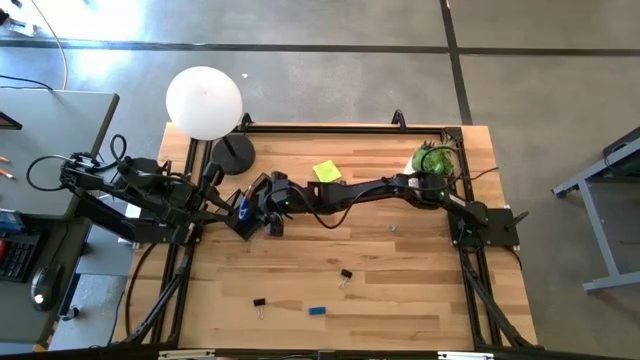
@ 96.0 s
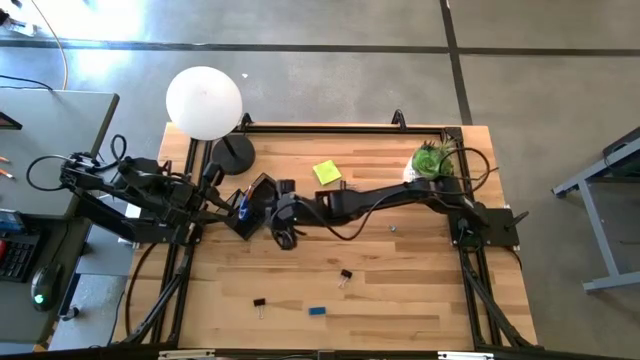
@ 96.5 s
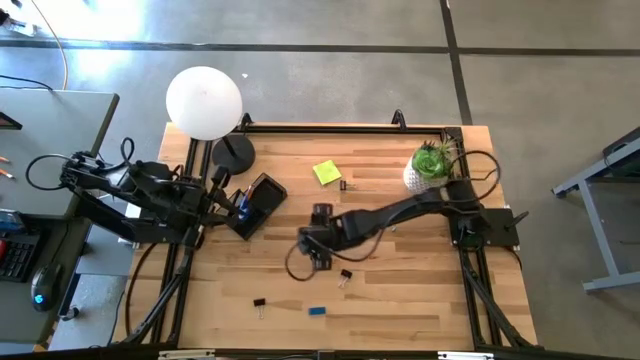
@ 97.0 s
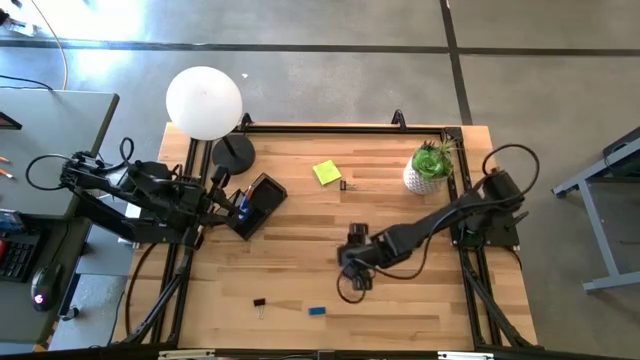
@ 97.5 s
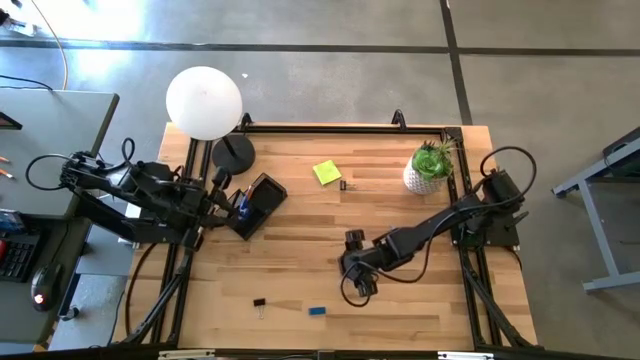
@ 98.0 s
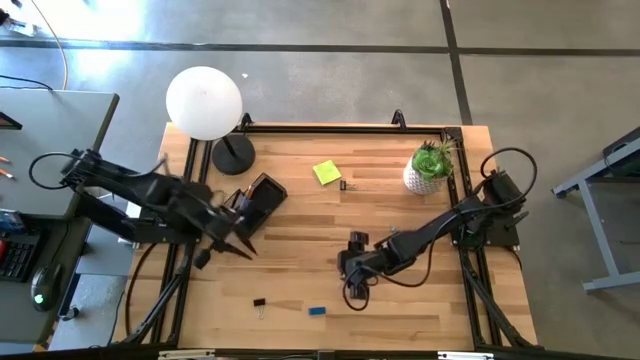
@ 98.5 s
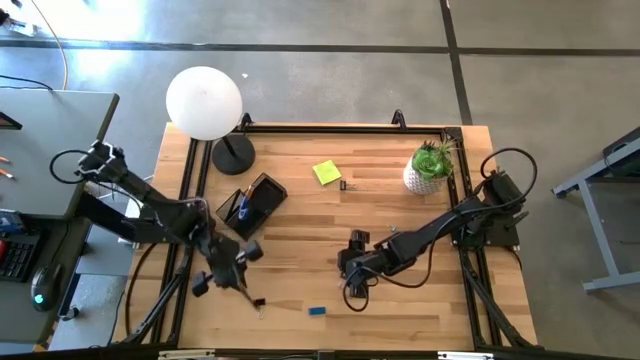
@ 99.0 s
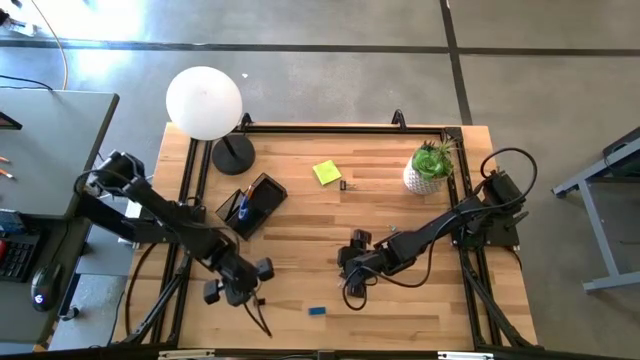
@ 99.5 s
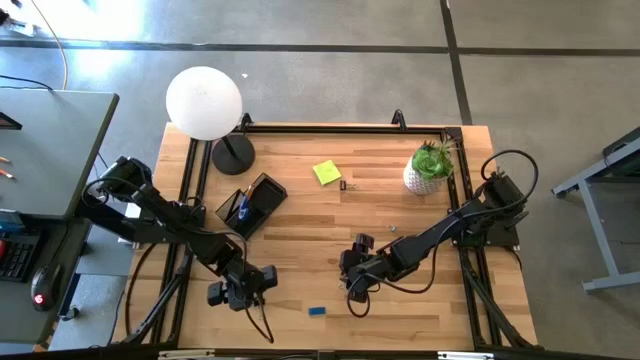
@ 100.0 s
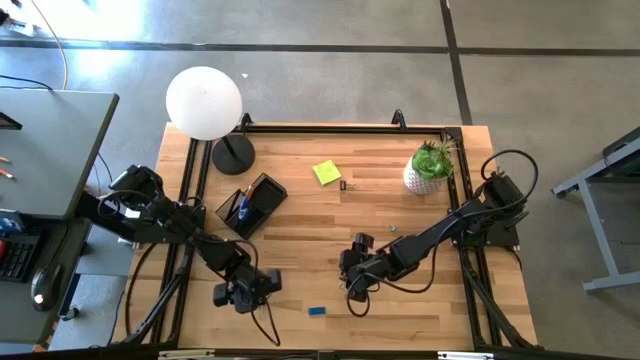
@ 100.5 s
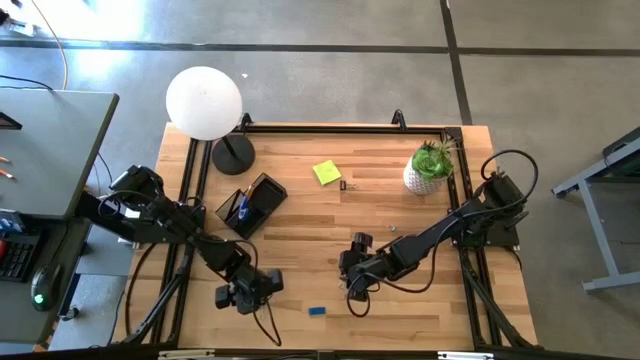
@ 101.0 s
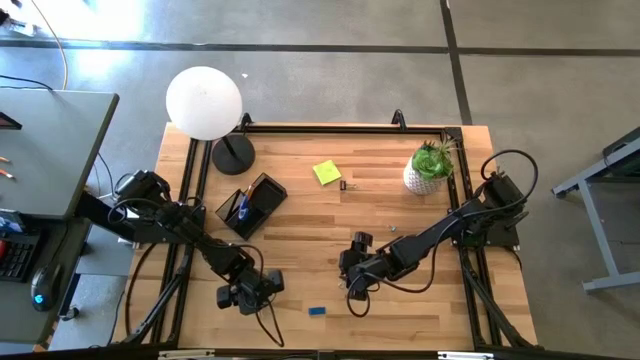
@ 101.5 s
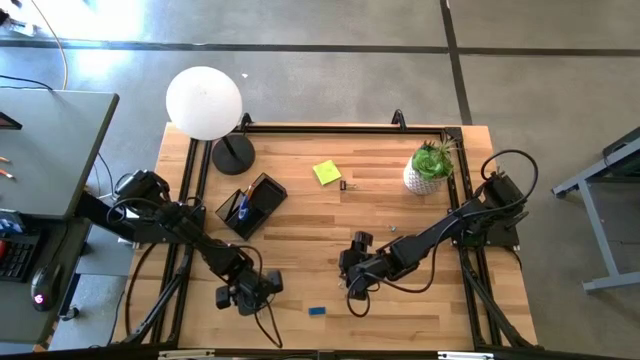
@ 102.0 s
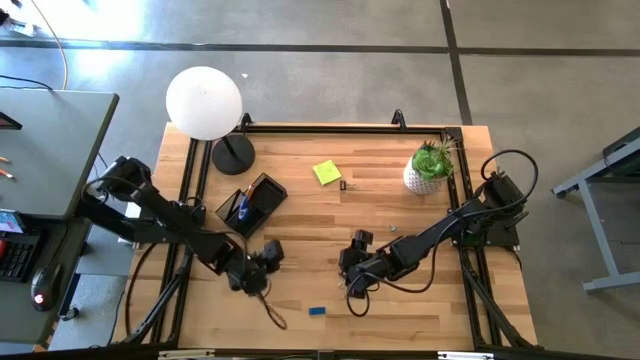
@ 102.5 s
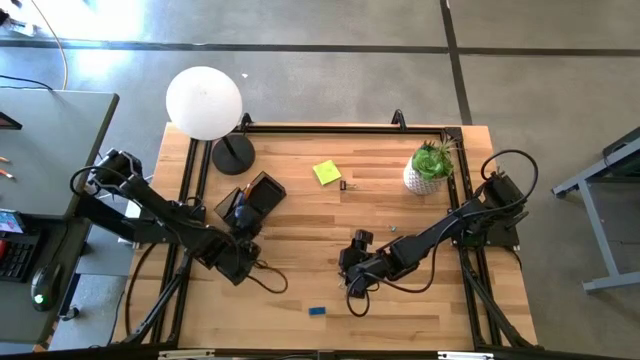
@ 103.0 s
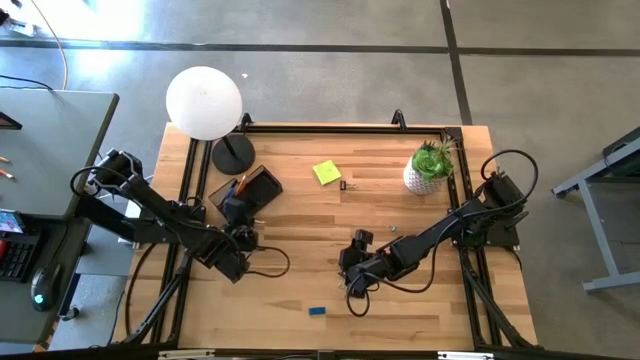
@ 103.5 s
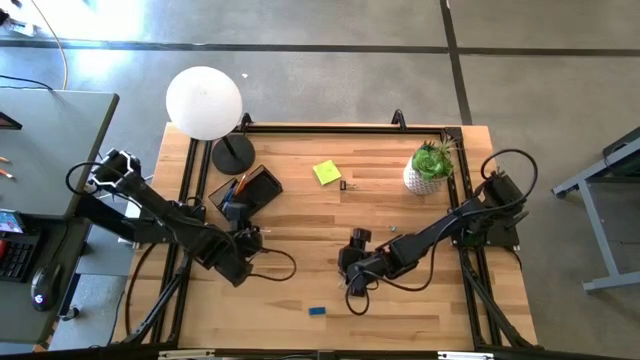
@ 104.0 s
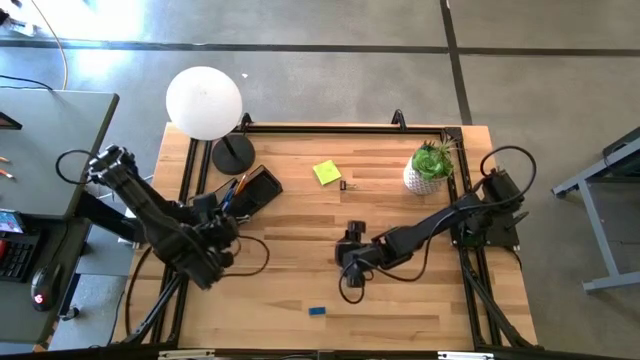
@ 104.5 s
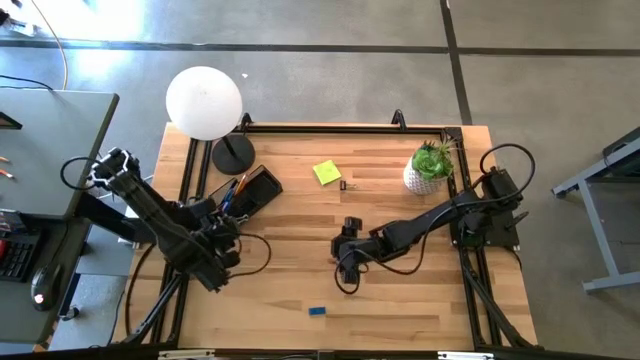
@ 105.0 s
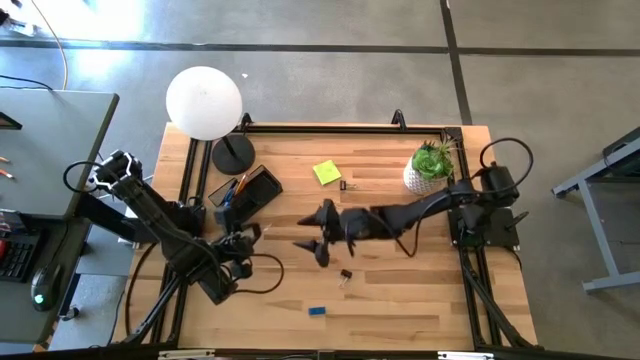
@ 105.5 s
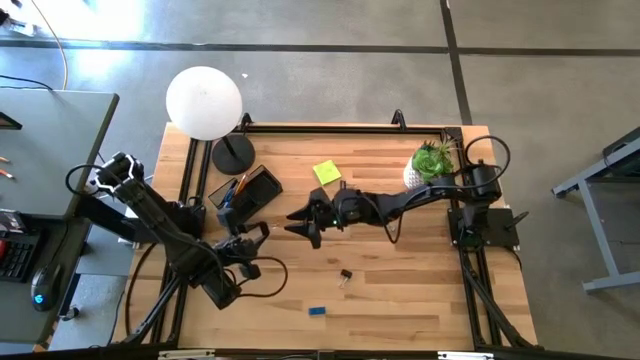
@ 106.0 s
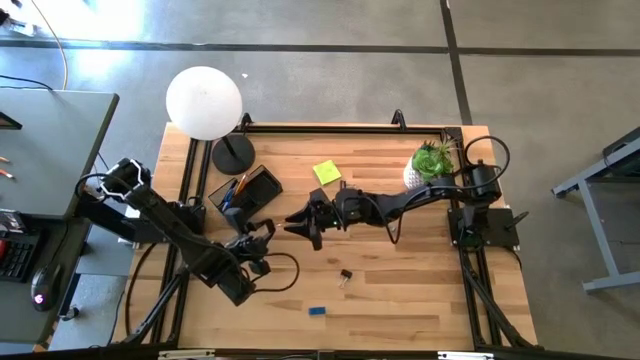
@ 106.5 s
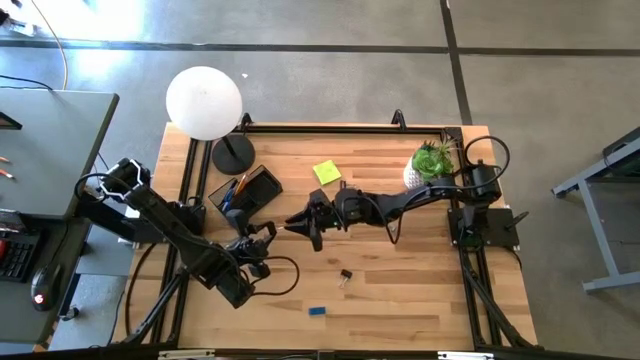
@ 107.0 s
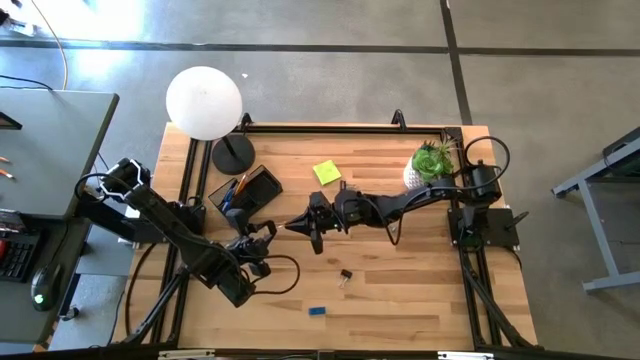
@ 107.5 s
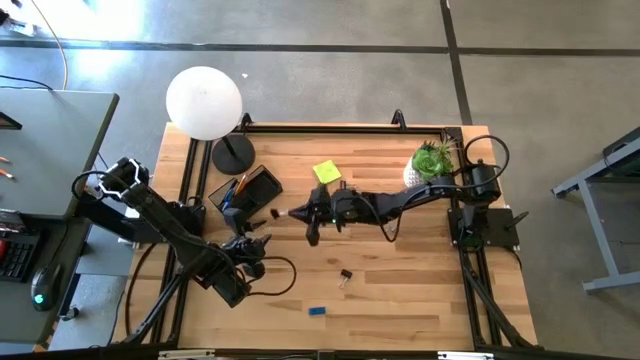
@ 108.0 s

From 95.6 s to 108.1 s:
Task: Pick and place office supplies into organizer
Put the left black binder clip into the black mesh desk organizer

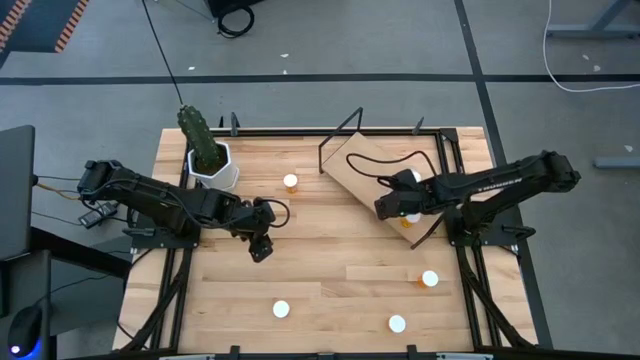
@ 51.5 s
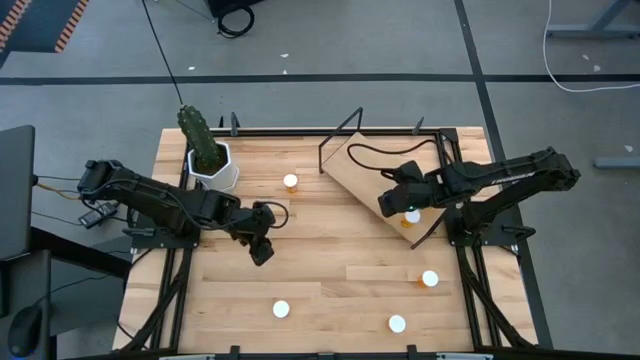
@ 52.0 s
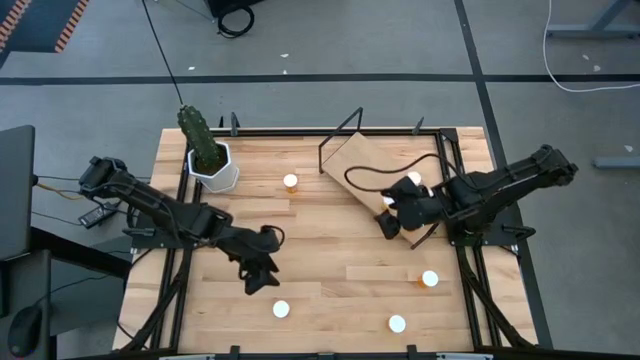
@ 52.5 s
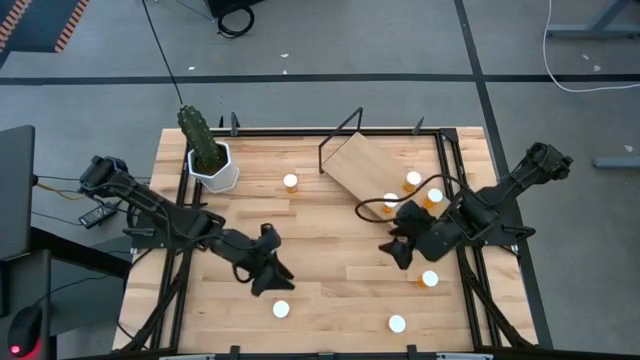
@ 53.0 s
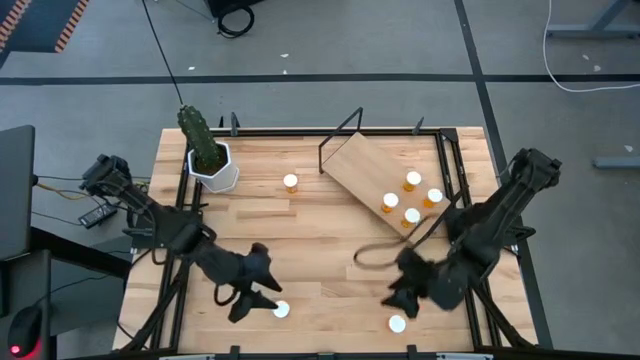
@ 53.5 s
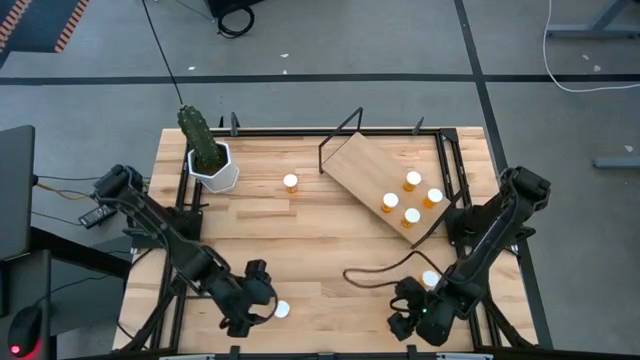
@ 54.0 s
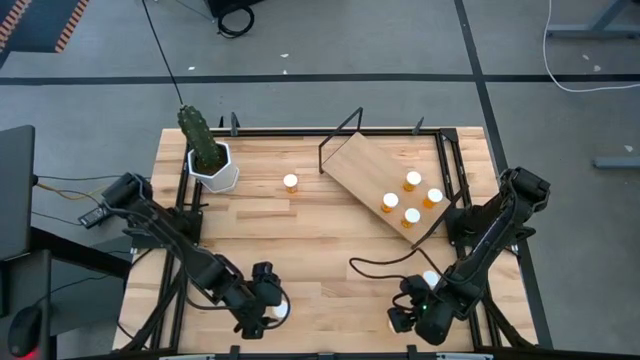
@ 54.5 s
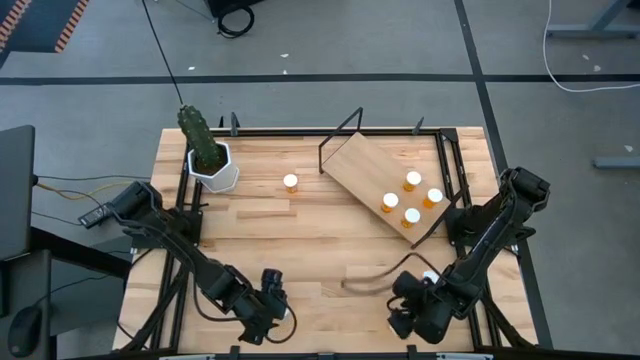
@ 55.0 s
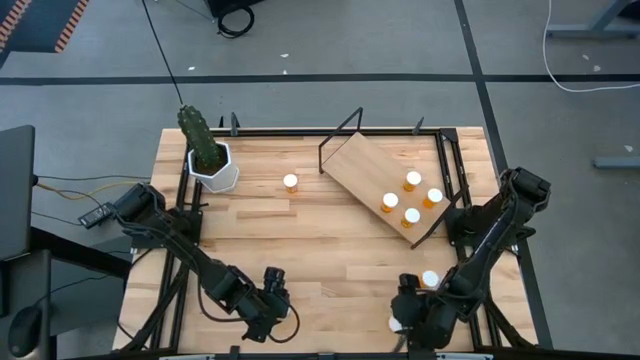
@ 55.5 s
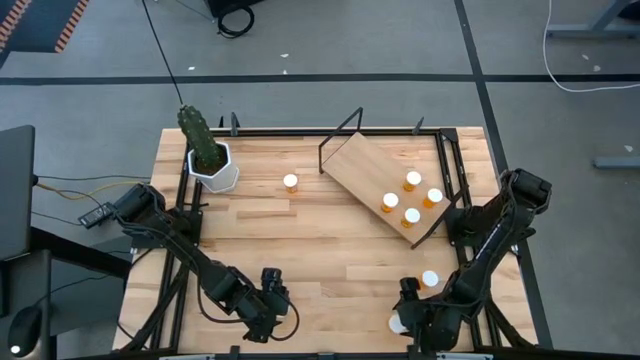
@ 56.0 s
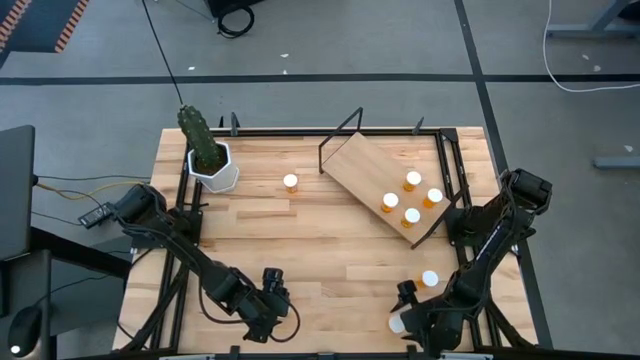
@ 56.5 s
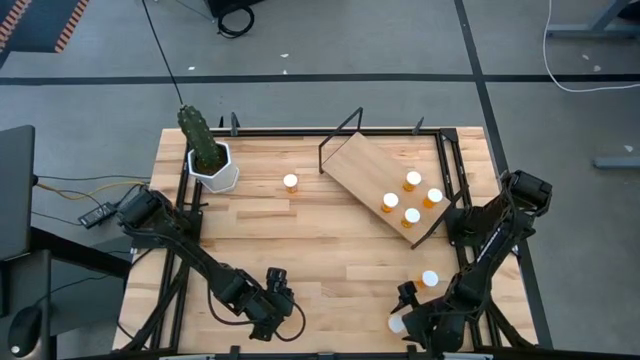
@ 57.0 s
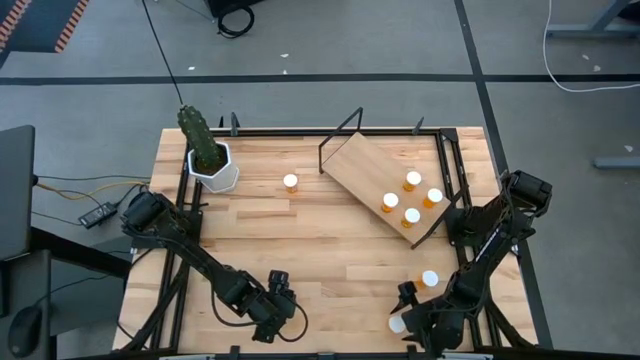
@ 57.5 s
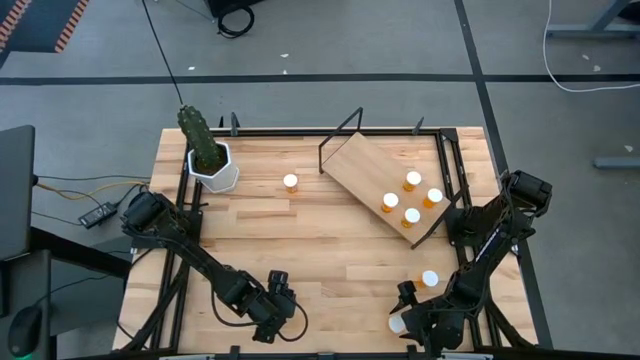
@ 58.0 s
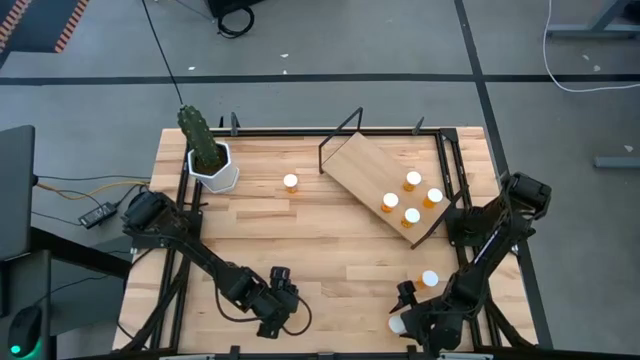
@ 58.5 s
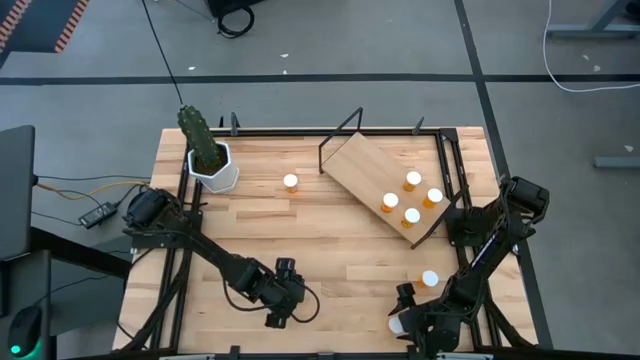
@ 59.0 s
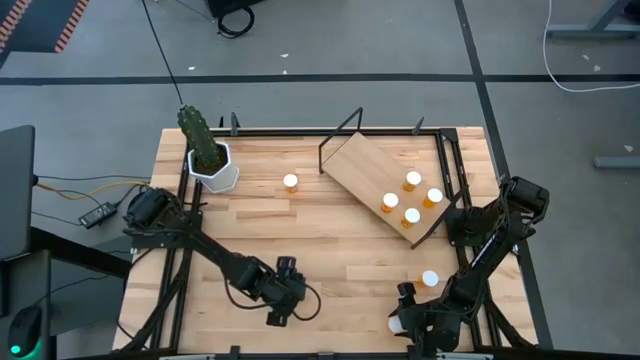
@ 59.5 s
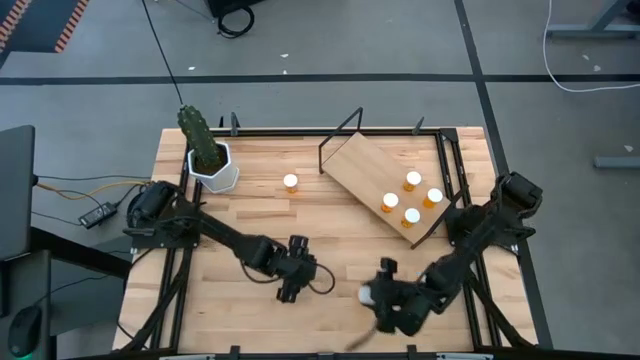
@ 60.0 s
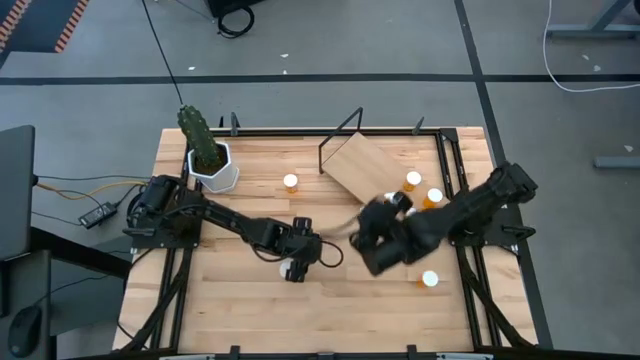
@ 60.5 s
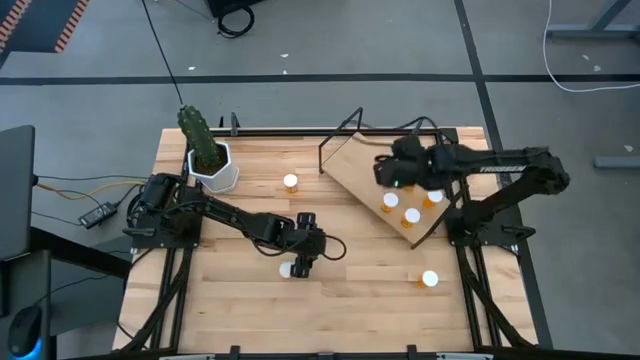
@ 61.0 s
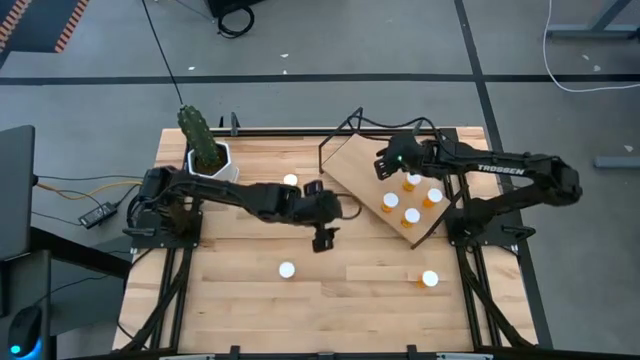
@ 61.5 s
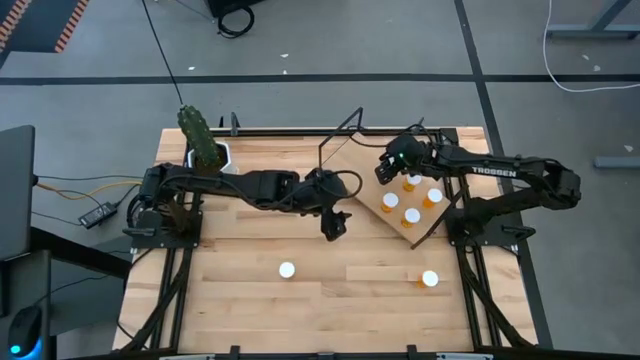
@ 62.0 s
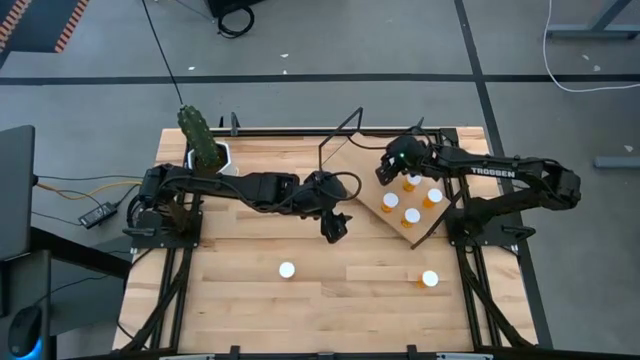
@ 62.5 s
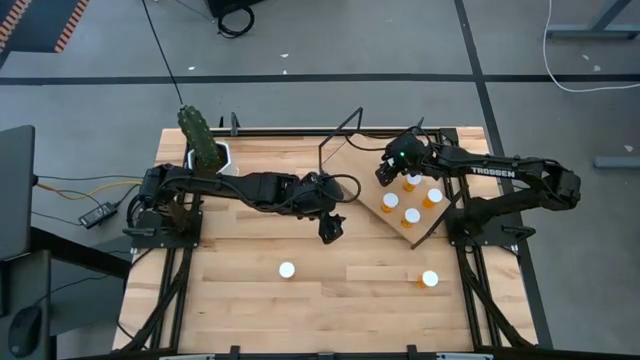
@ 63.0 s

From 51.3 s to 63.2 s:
Task: Pick and place medicine bottles onto shelf by color
Put the orange pill bottle to the middle left on the shelf
